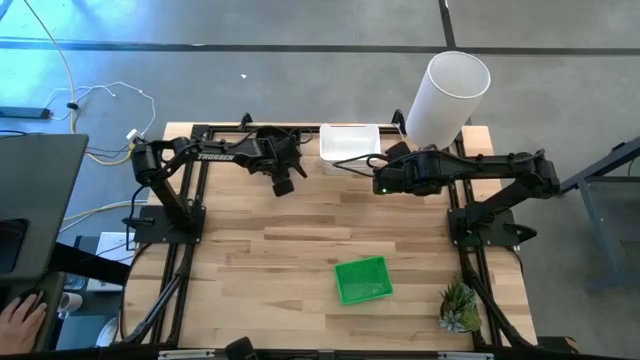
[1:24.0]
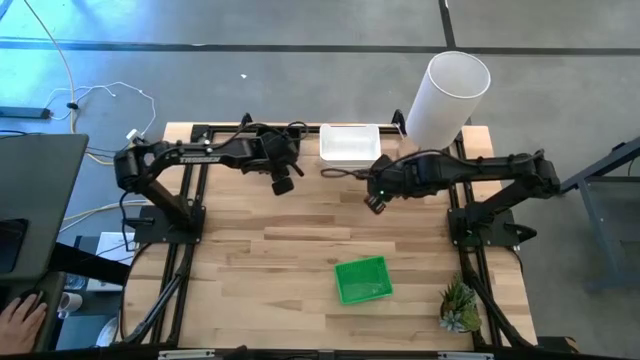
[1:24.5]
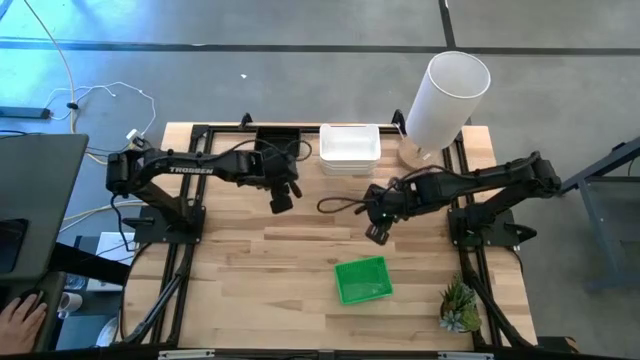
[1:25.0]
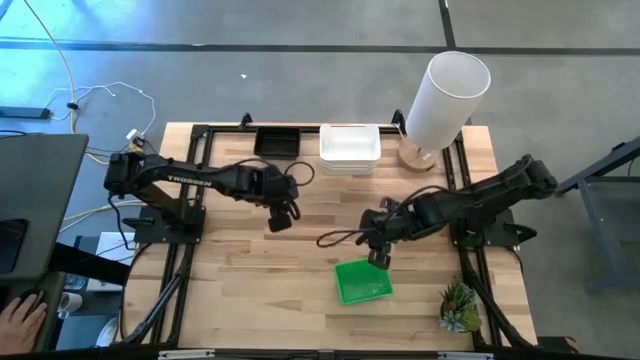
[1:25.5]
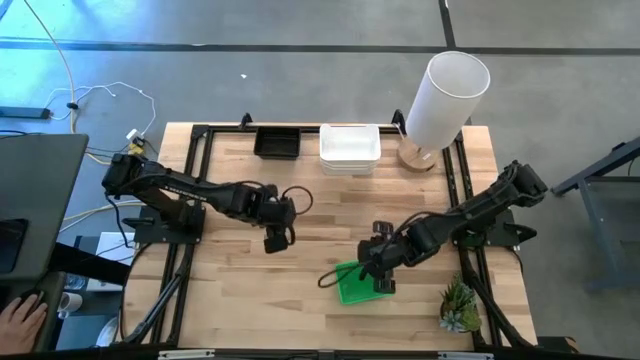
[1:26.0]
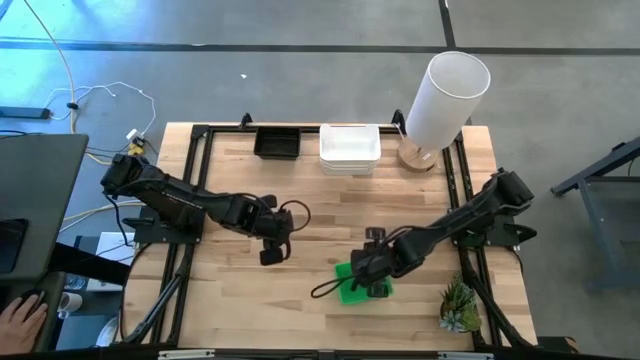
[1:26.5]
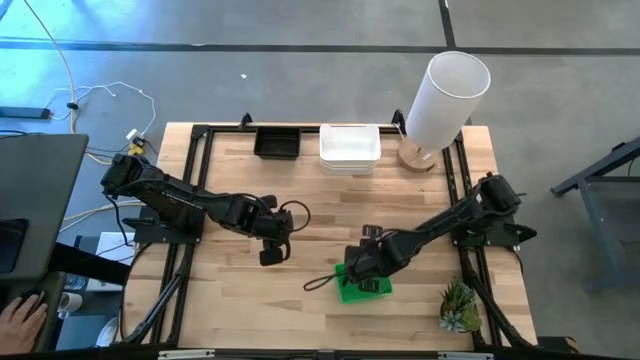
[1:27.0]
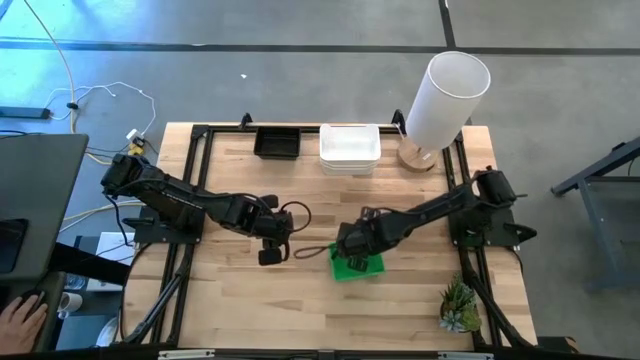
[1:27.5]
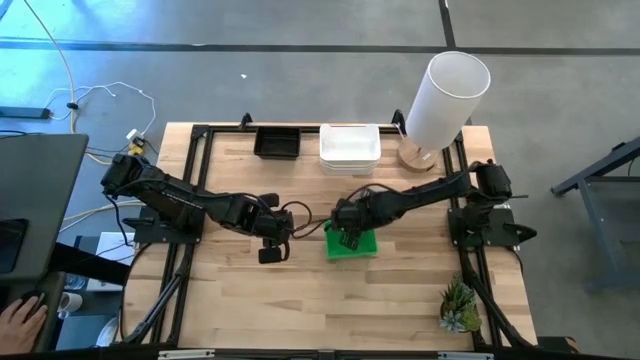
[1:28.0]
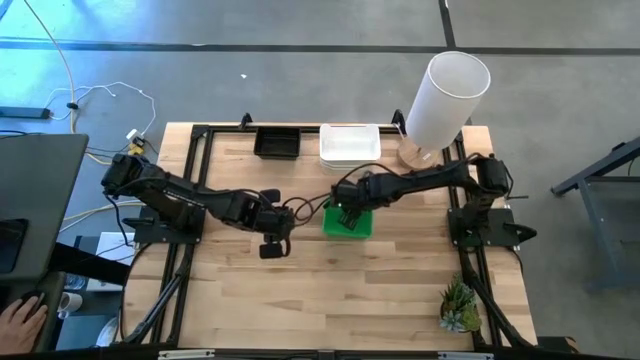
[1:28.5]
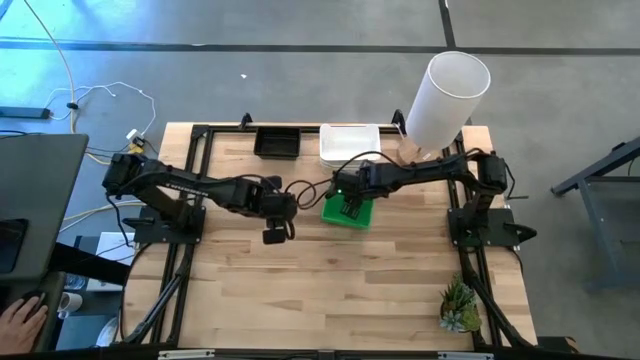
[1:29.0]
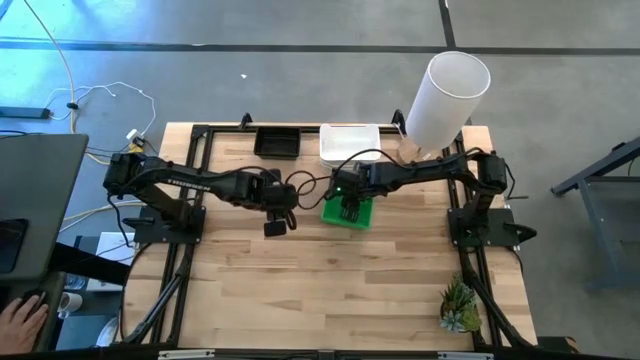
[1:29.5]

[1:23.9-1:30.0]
Task: Stack baskets on shelf by color
Move the stacked green bins to the center of the table

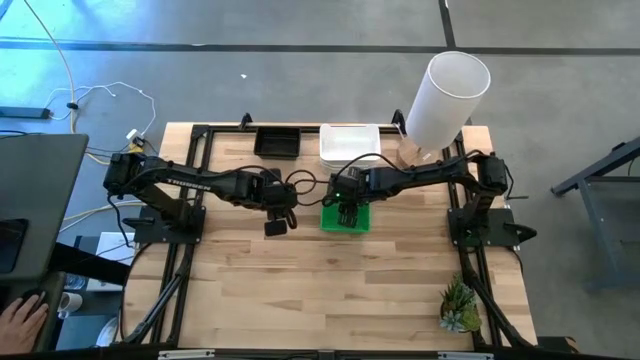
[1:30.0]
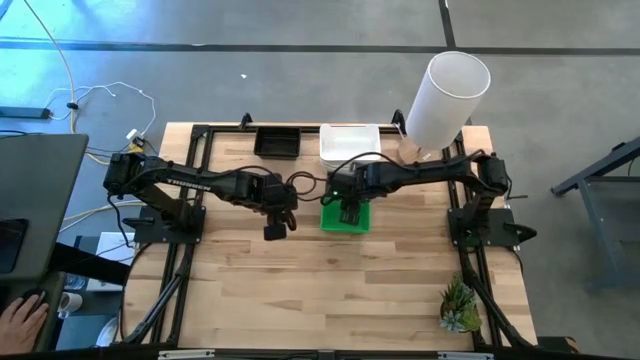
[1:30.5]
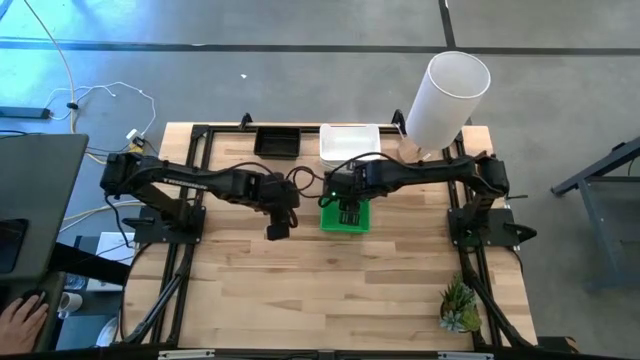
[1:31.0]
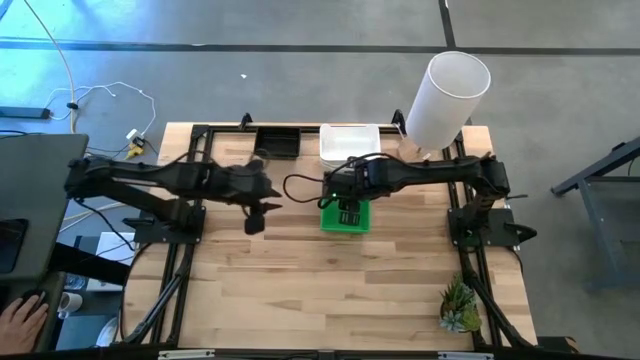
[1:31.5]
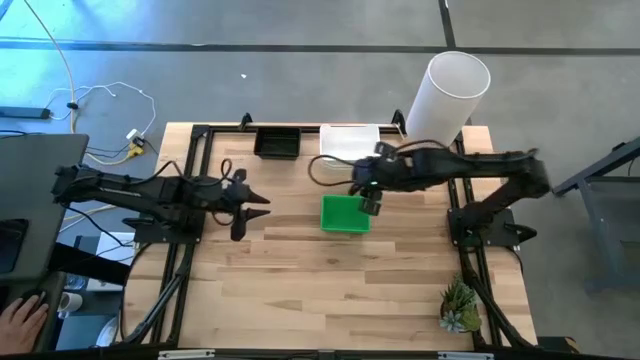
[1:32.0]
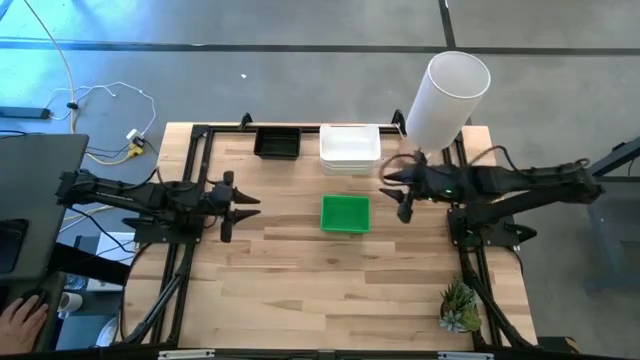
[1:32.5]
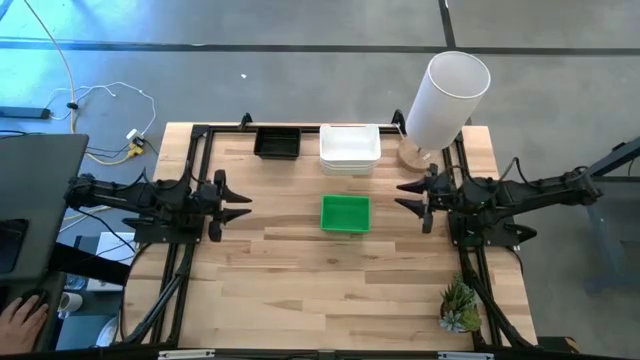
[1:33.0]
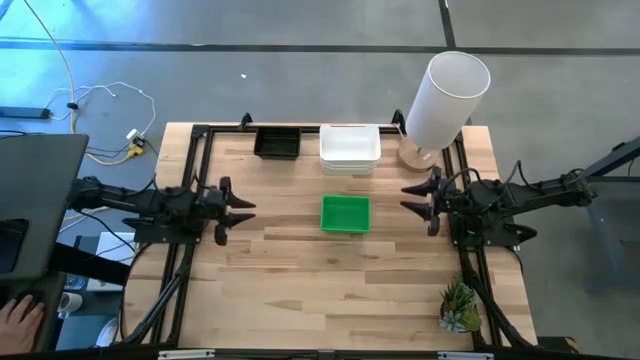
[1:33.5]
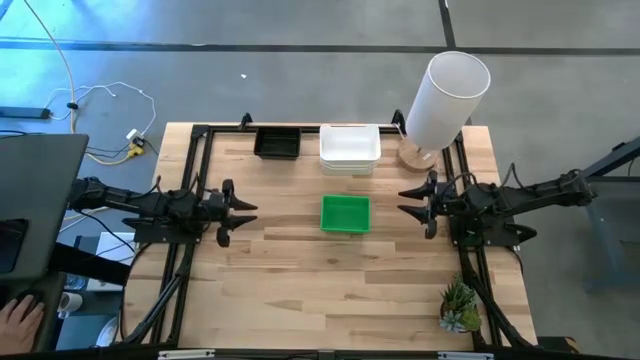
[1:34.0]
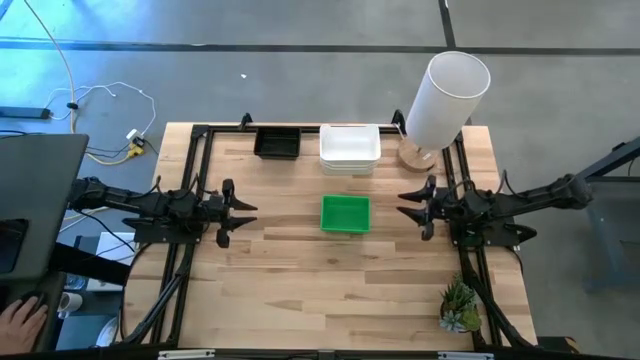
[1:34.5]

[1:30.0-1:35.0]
Return to Home Position

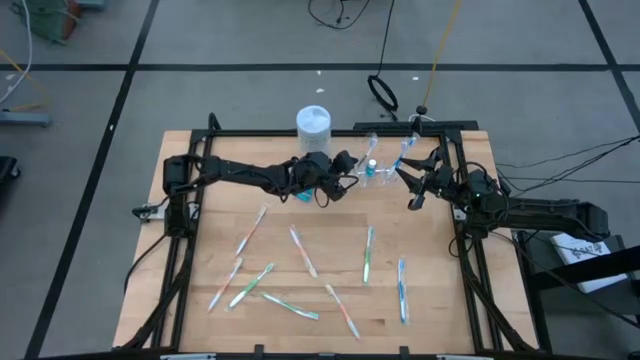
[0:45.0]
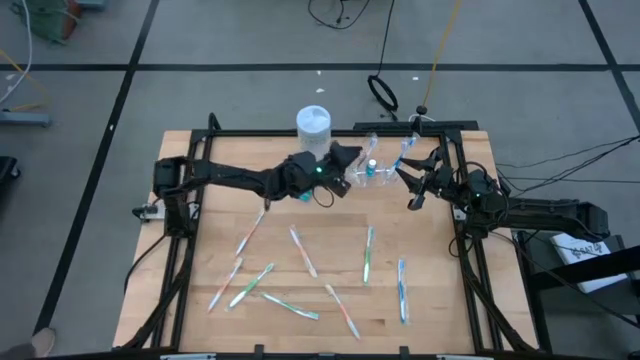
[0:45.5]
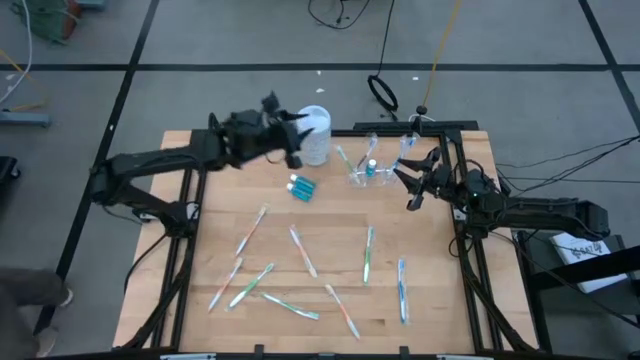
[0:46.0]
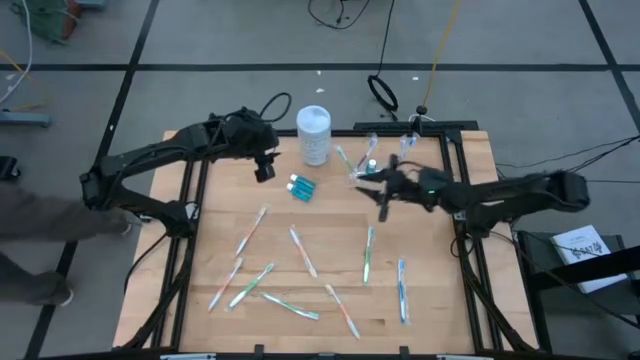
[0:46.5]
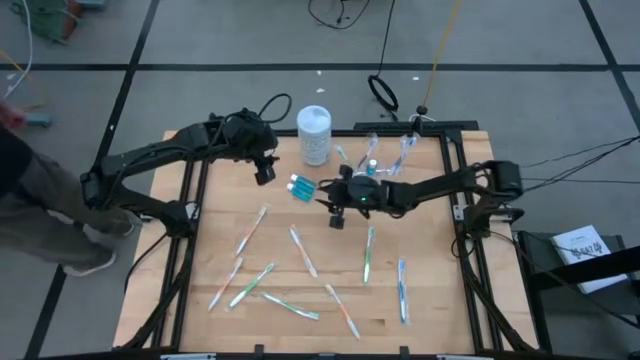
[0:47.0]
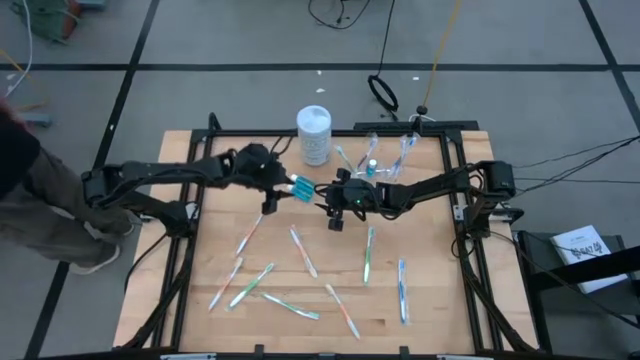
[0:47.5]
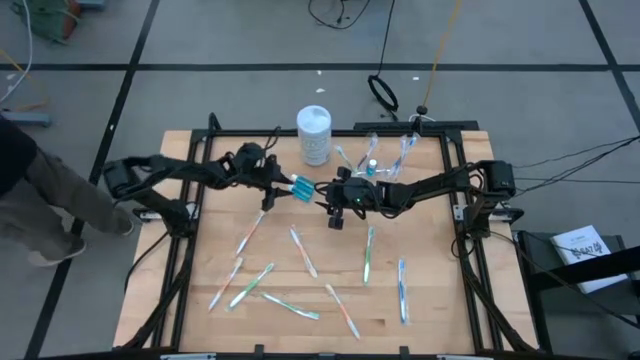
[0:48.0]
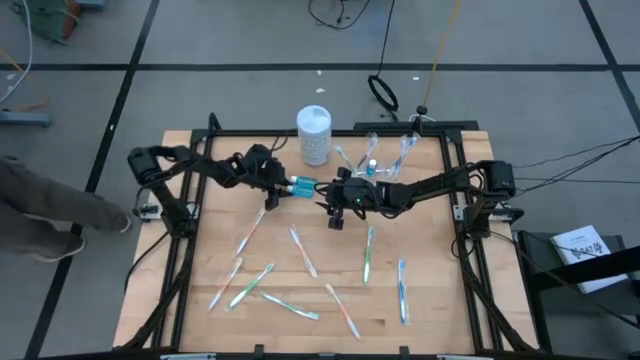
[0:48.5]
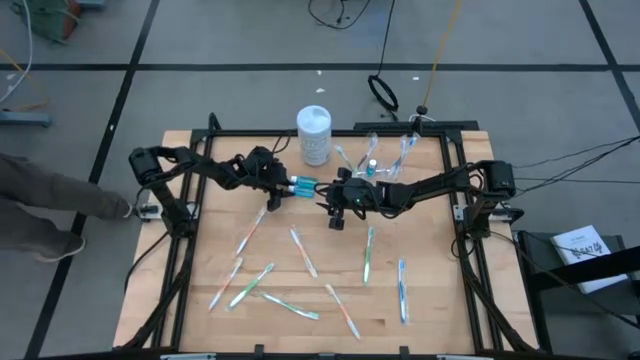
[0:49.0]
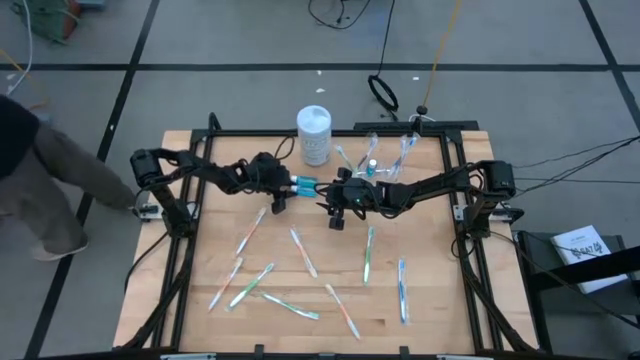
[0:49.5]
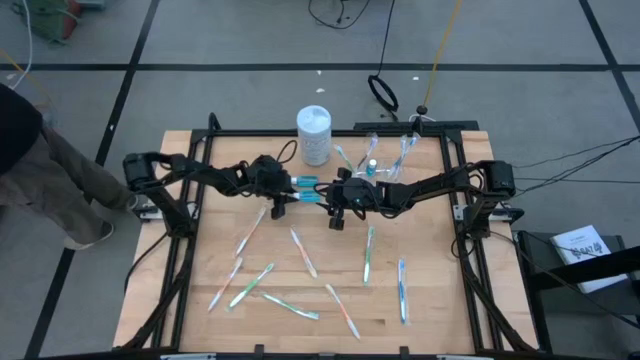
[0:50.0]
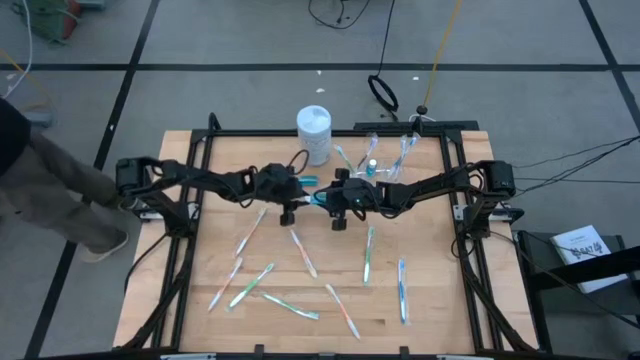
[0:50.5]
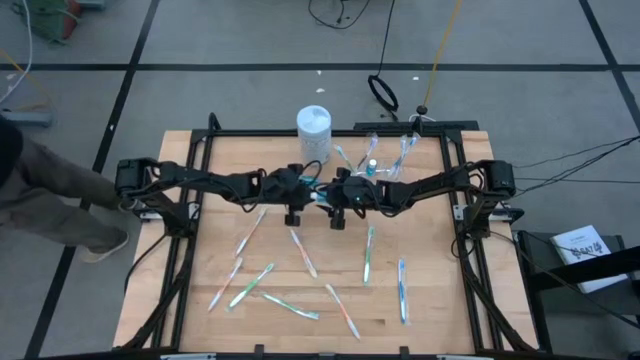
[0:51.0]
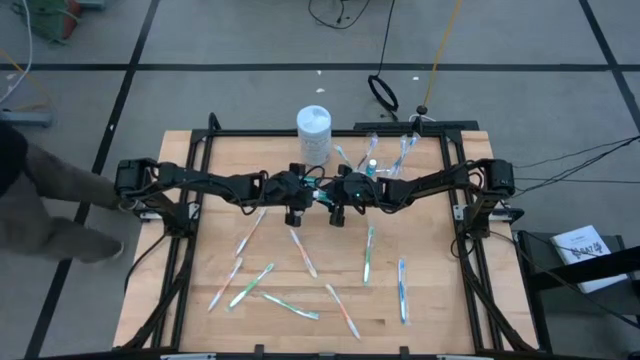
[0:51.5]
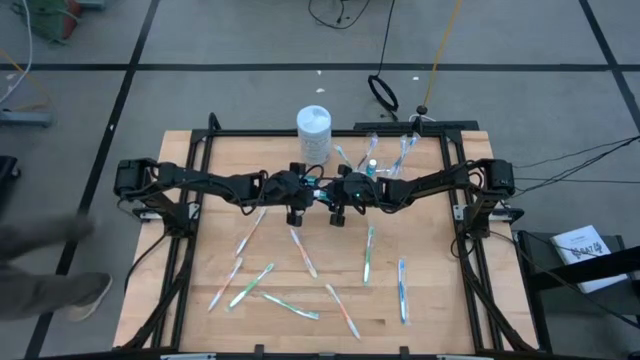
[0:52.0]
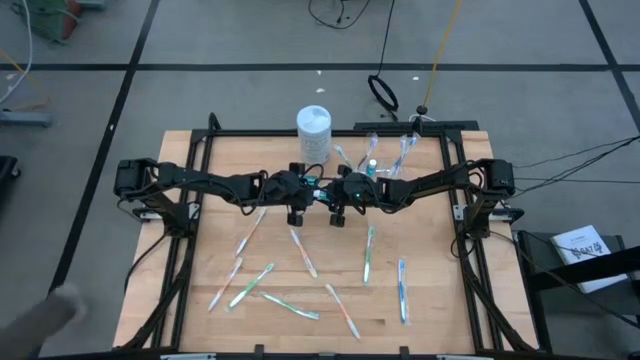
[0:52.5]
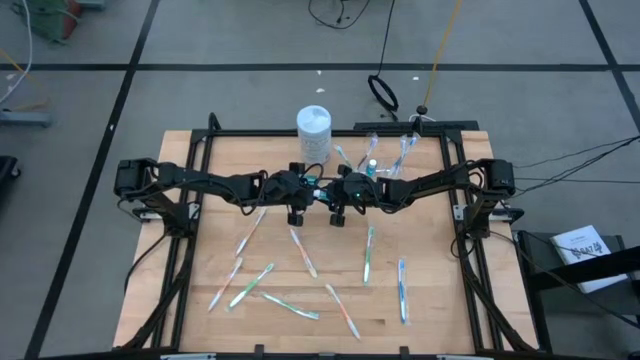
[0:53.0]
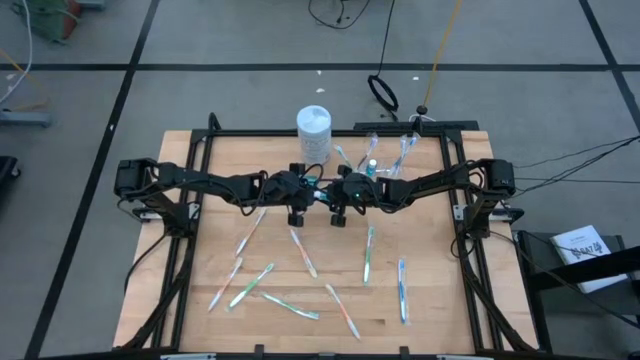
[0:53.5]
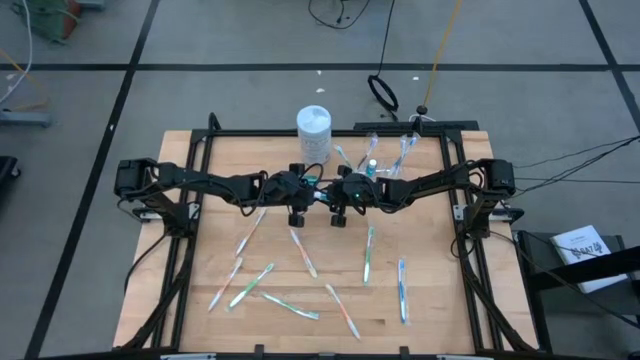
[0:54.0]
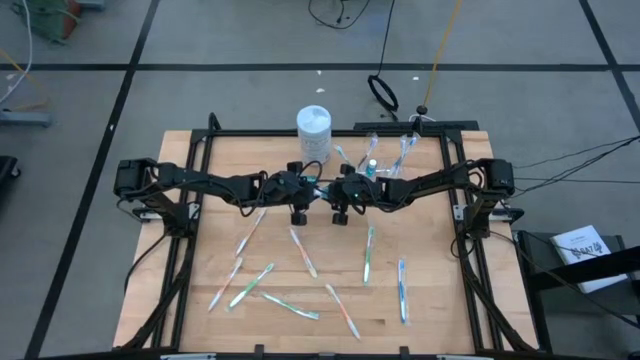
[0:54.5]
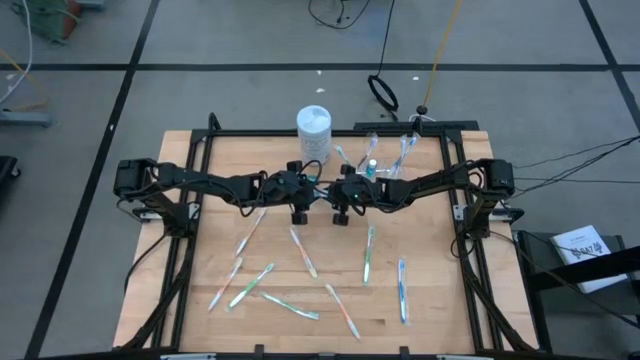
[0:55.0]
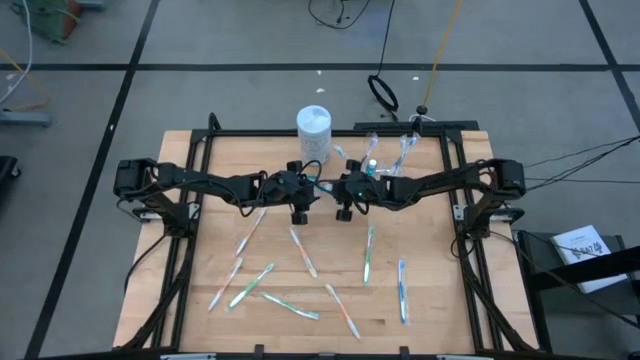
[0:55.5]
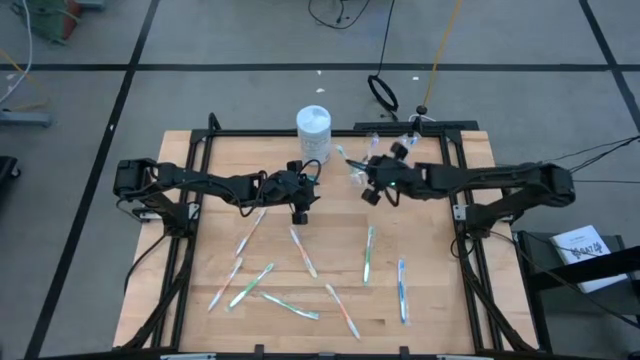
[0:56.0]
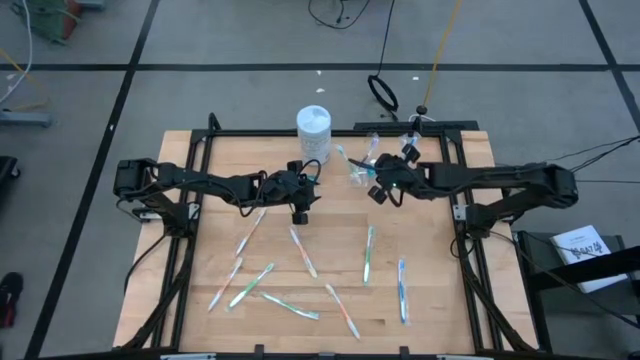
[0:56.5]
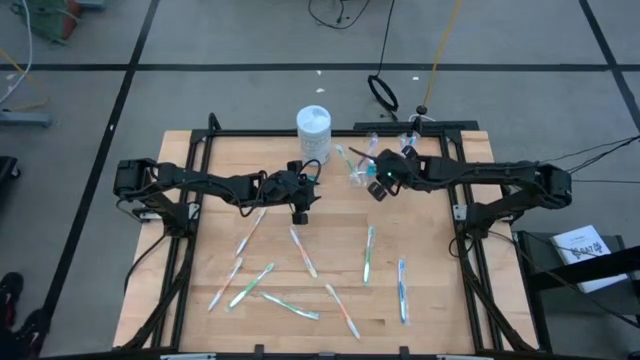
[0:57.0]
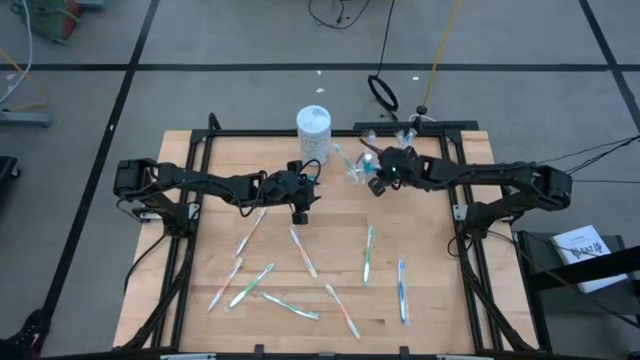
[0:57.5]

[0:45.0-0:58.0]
Task: Pick & Place toothbrushing station
Put the blue mouthwash into the transparent organizer
